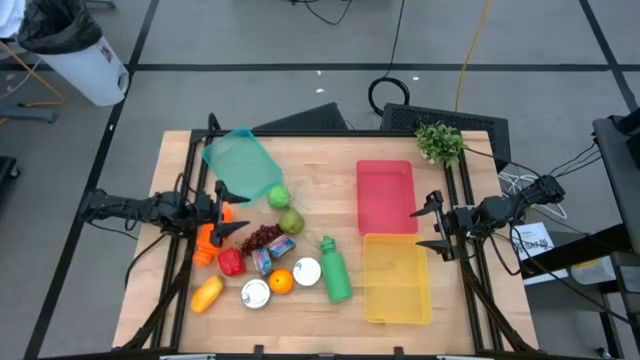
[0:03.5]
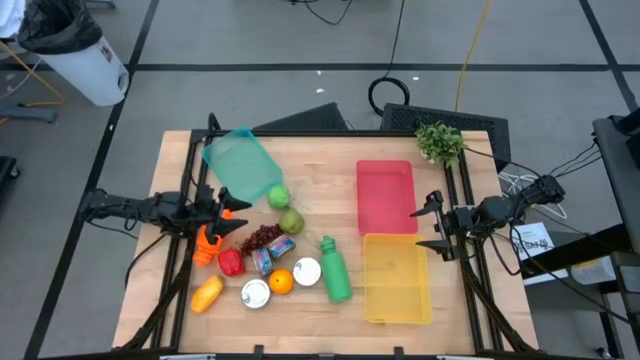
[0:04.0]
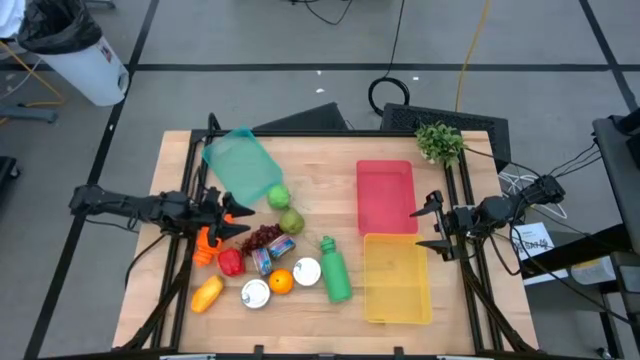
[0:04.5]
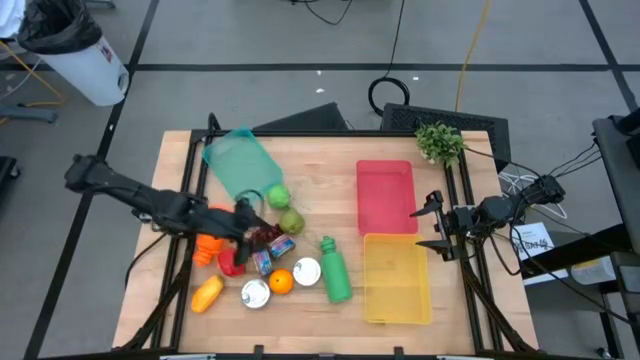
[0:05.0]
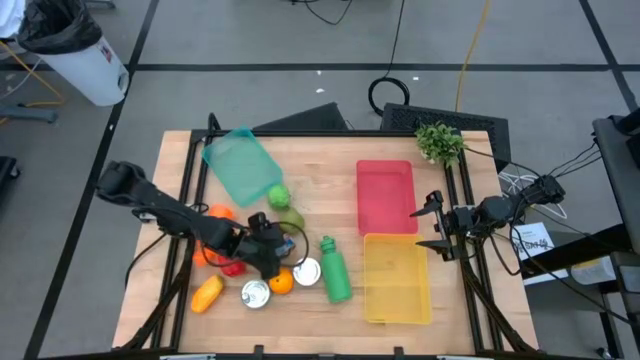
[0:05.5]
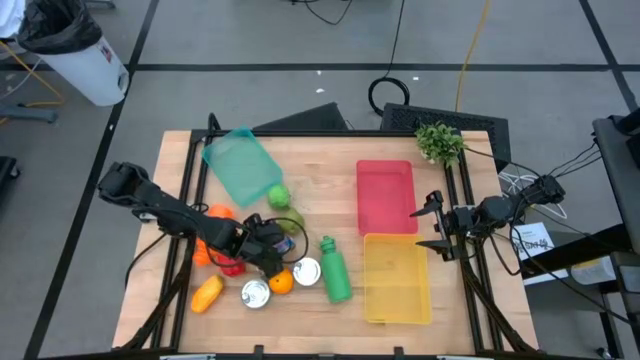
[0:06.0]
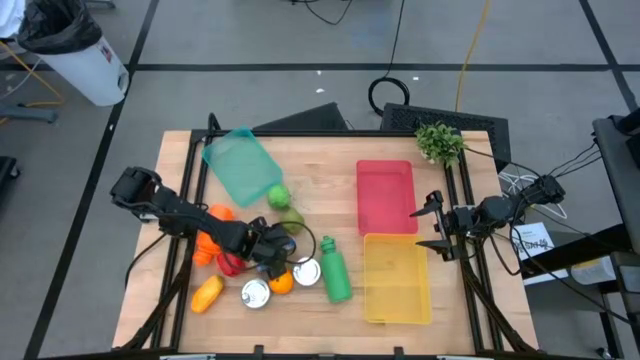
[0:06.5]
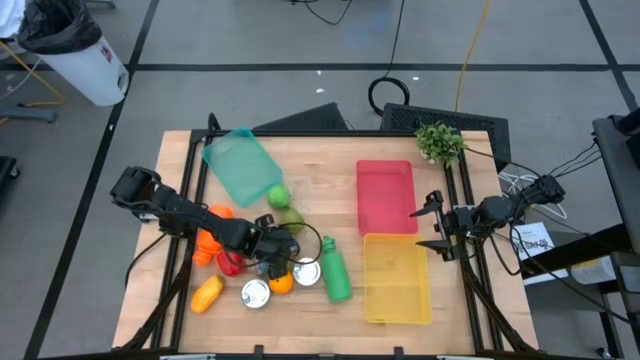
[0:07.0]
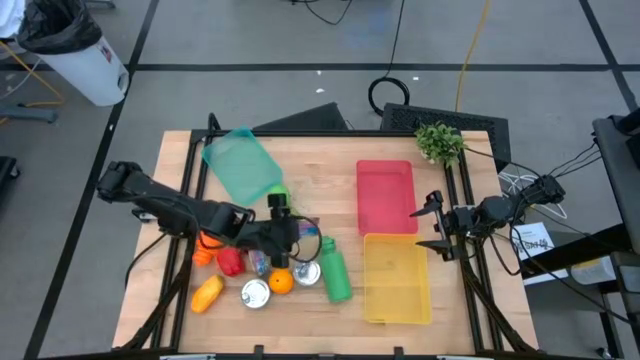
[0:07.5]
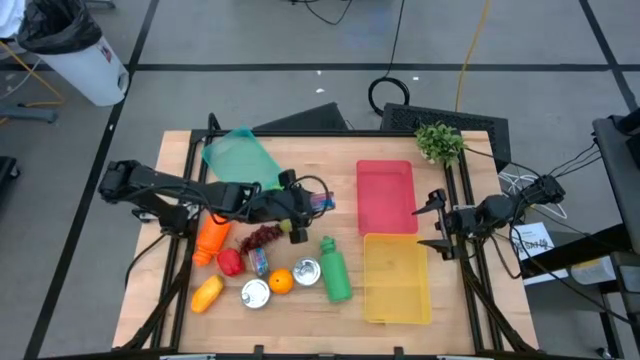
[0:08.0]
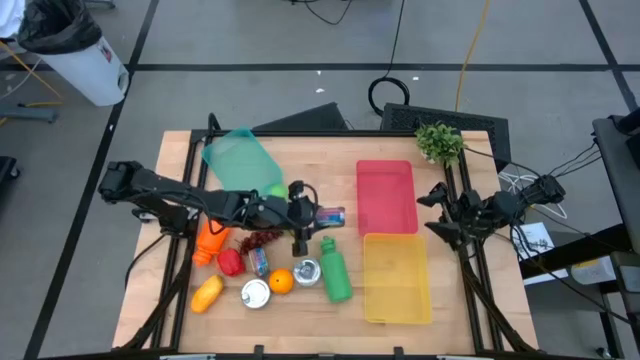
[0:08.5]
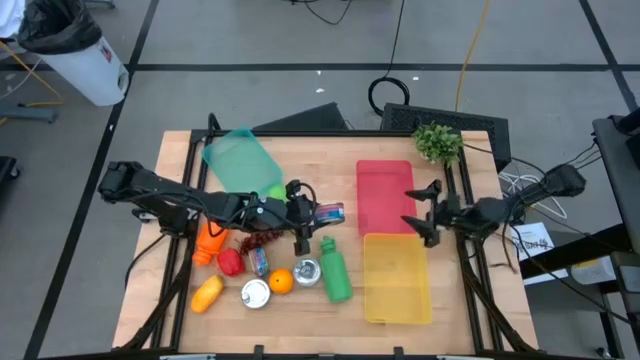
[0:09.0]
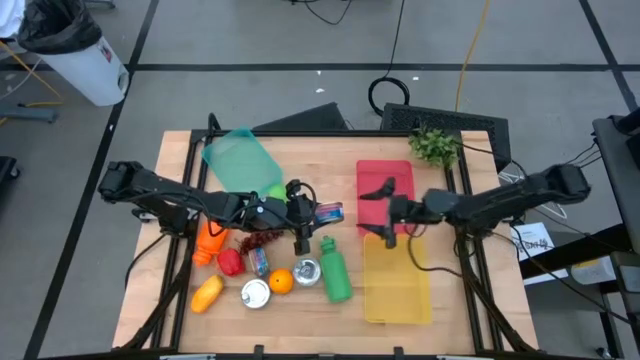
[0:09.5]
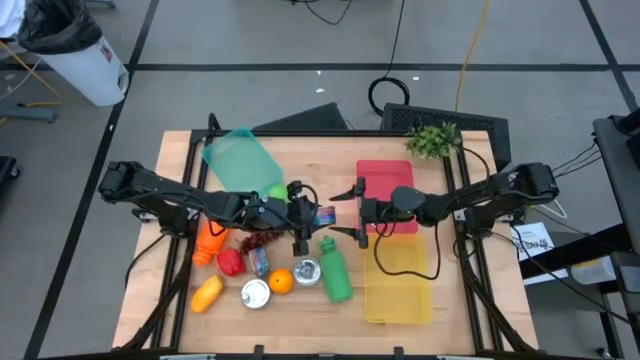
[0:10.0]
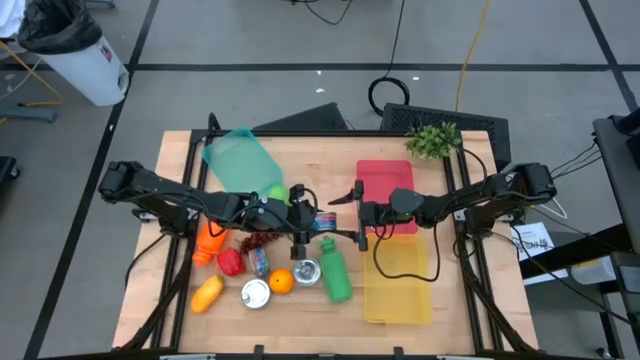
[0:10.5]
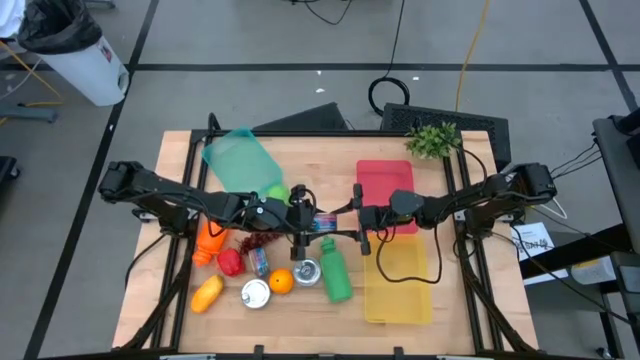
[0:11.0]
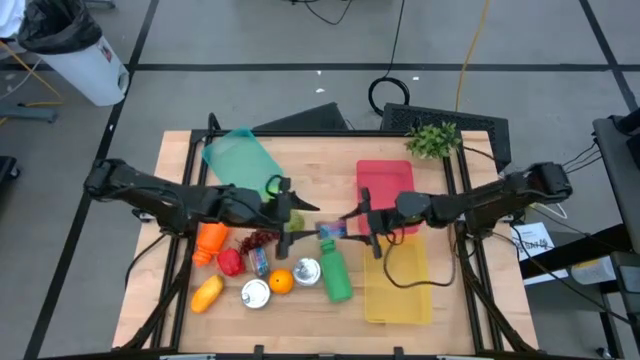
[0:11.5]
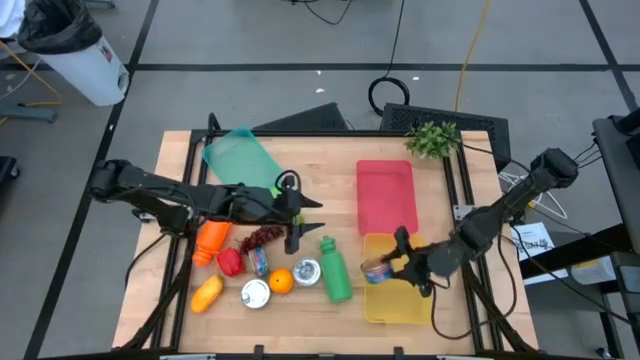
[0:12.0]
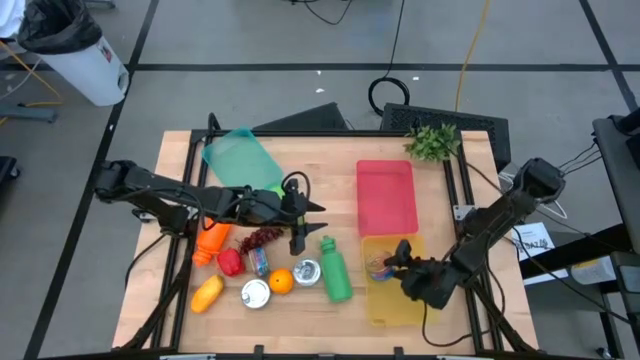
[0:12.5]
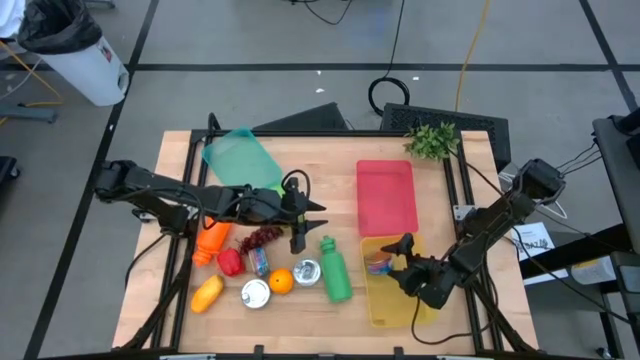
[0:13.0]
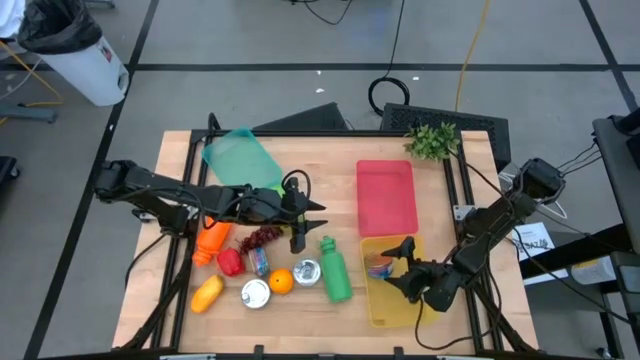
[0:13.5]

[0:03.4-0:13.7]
Task: Pick & Place Food Item
Put the blue and pink tuna can into the yellow bin

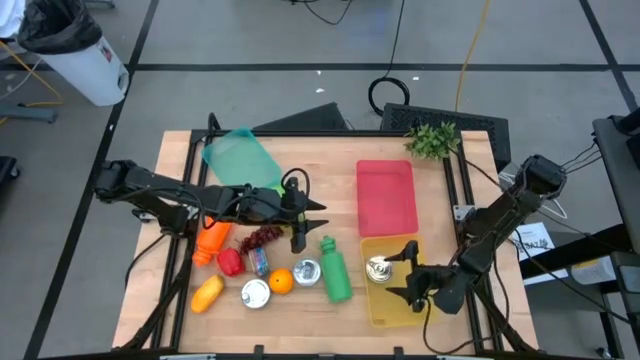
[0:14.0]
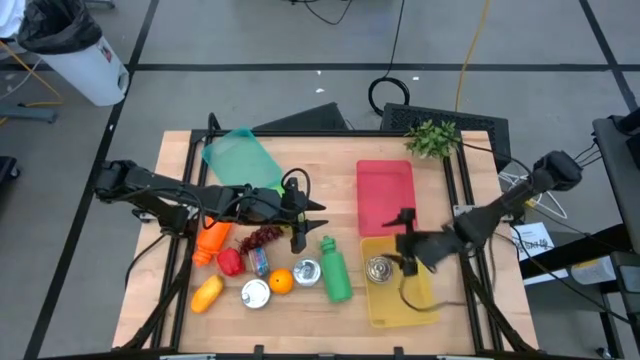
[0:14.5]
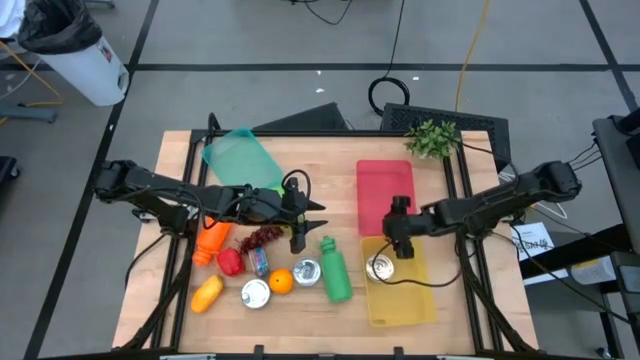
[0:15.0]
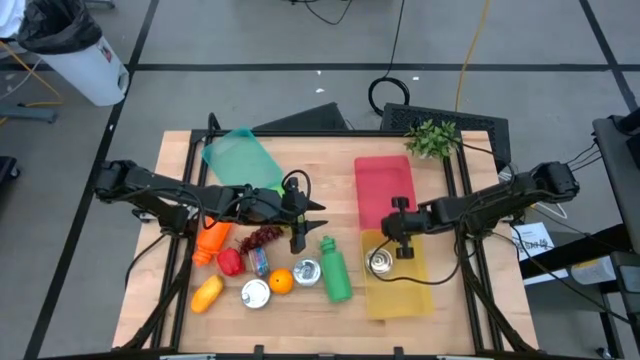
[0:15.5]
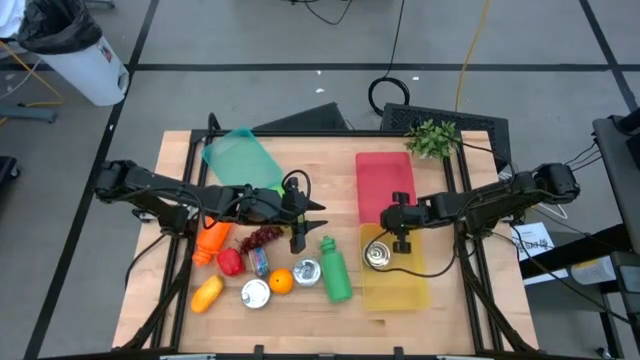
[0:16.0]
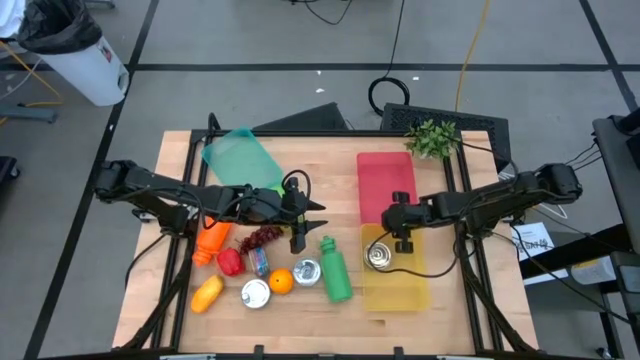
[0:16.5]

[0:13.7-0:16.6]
Adjust the bins on the table

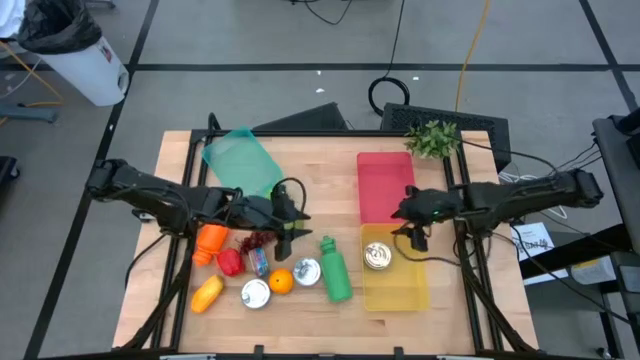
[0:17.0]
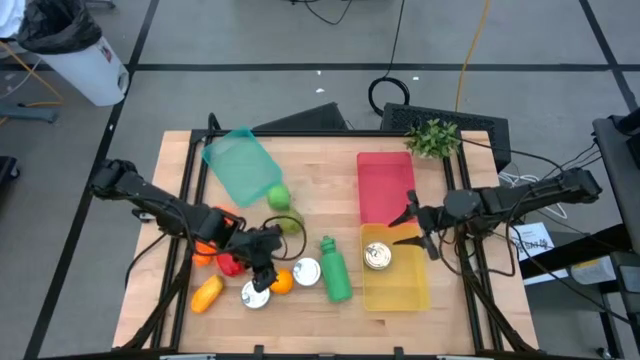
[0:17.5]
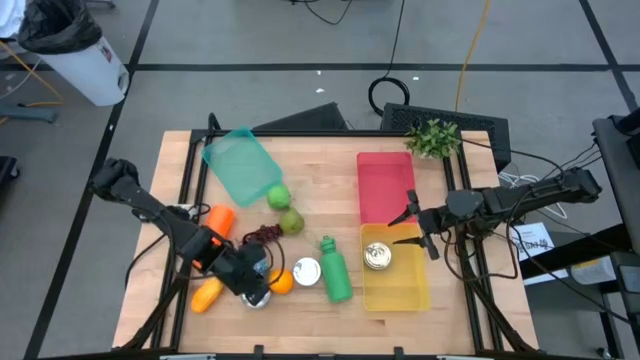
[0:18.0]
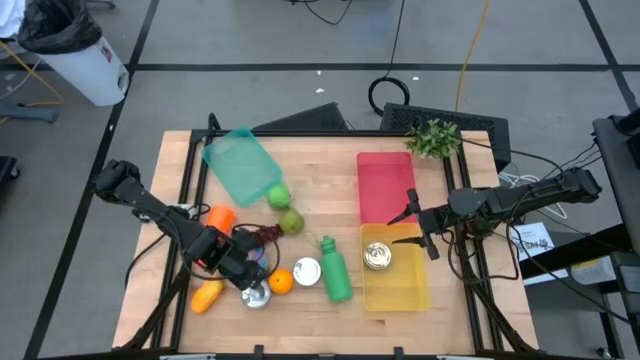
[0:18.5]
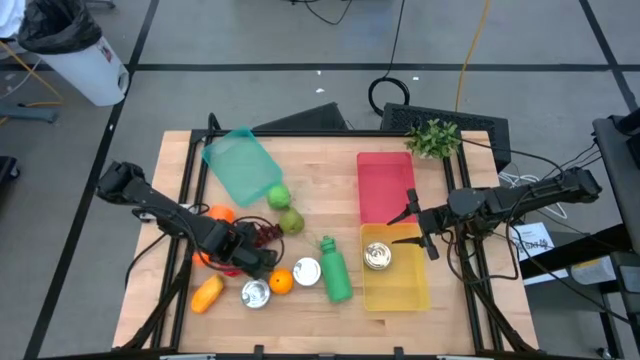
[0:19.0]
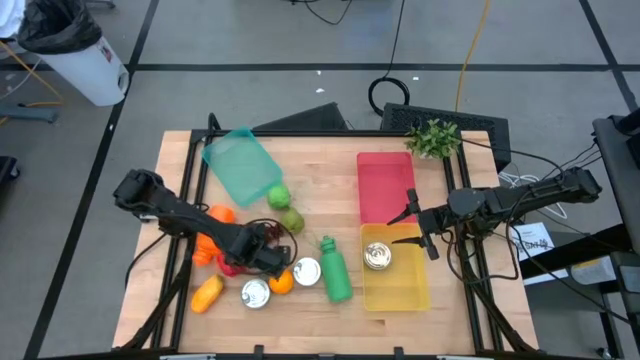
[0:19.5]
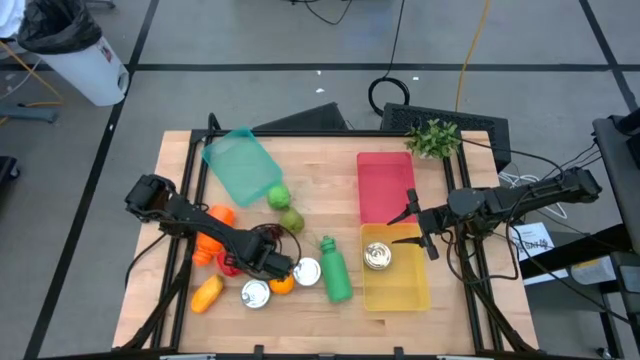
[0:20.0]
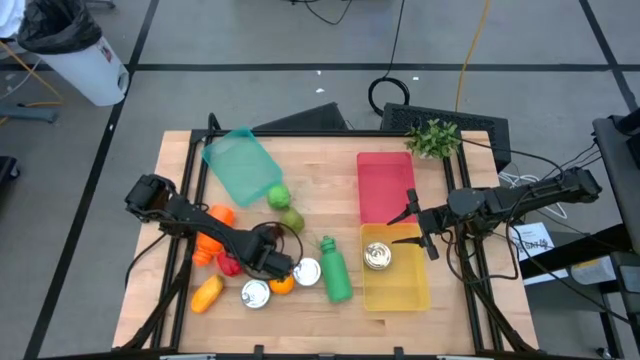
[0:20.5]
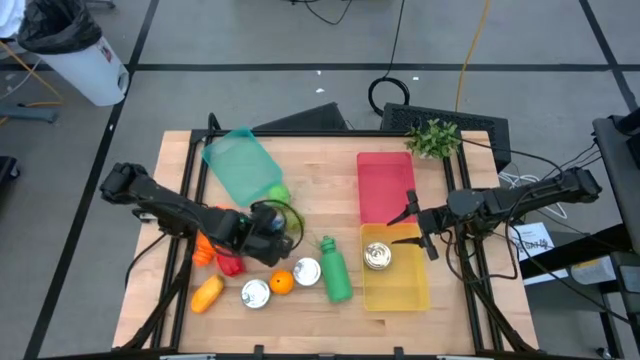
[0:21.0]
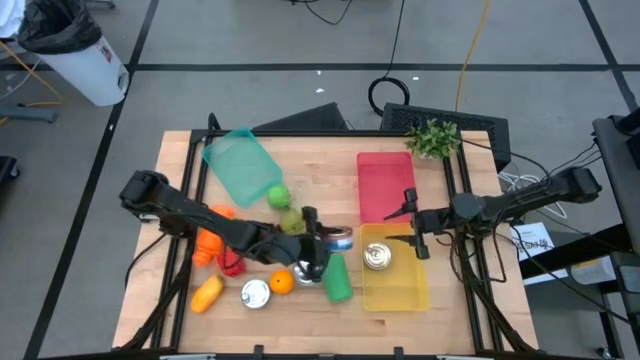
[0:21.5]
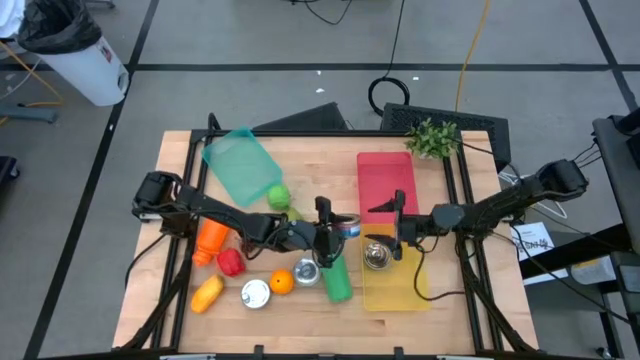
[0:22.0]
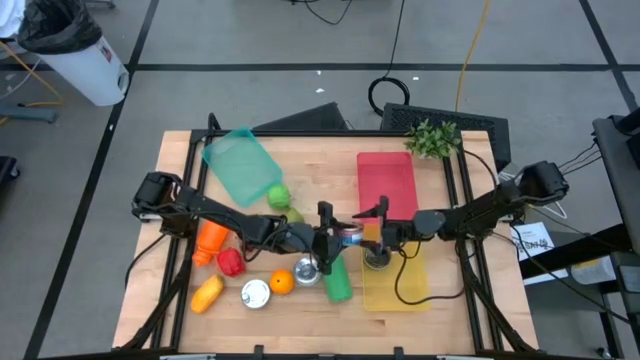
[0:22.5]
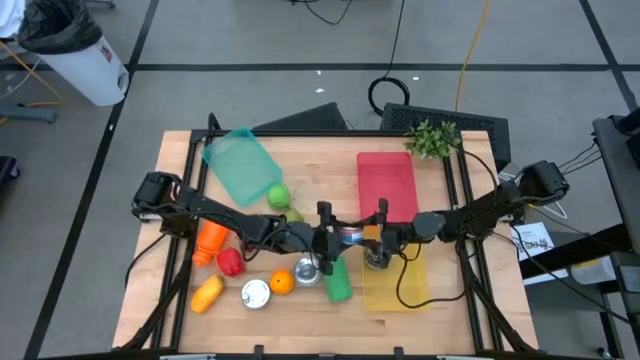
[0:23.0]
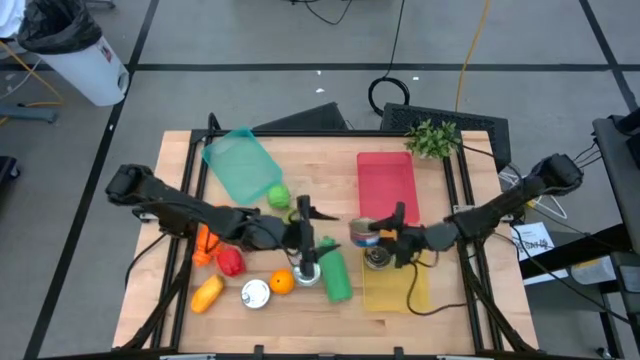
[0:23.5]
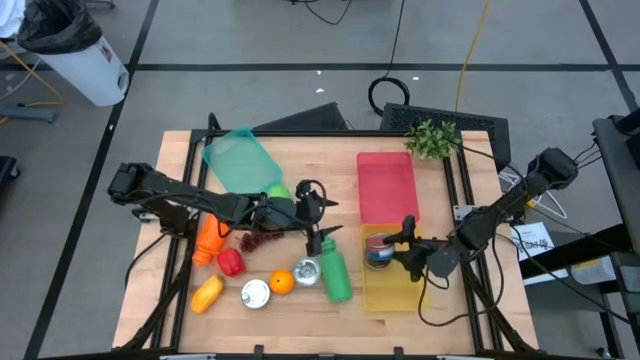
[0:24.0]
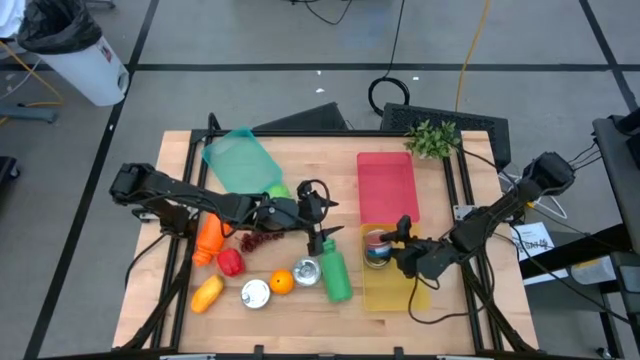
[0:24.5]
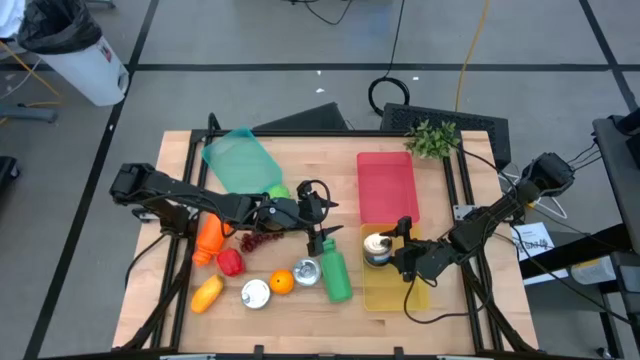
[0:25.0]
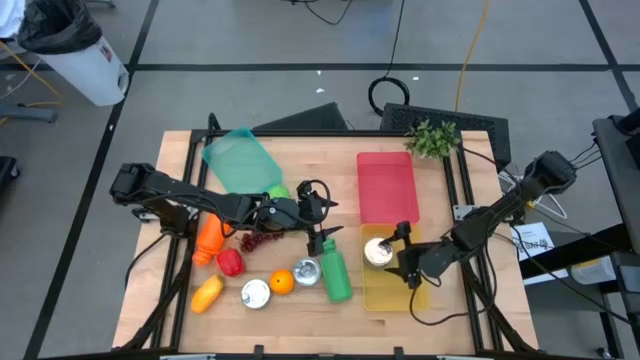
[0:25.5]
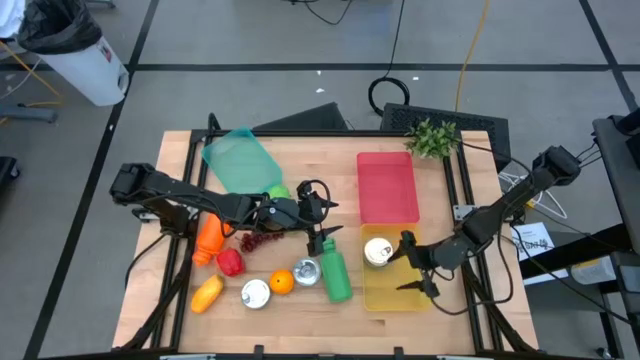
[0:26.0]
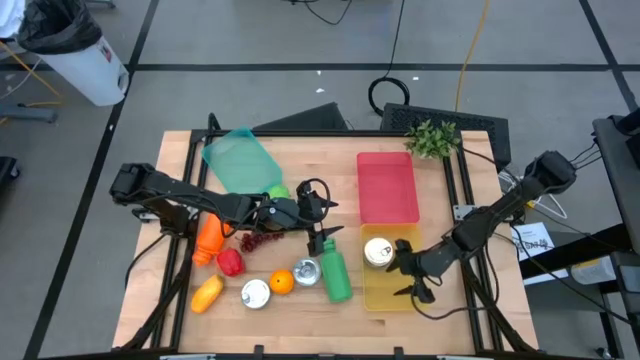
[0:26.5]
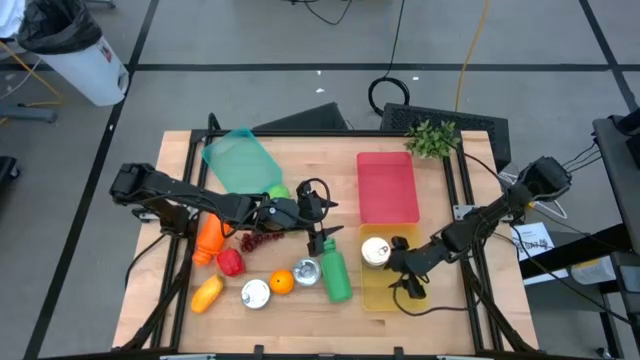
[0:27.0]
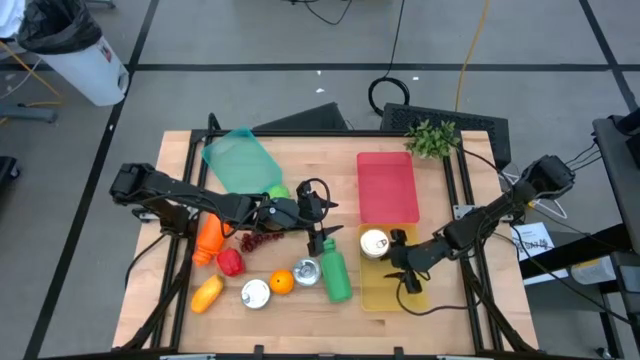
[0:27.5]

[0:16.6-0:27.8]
Put the blue and pink tuna can into the yellow bin
